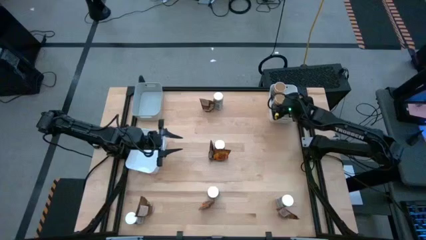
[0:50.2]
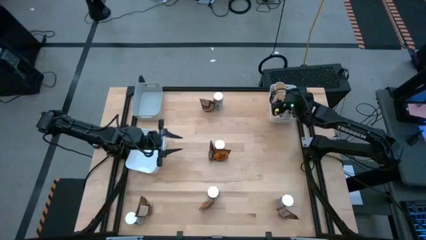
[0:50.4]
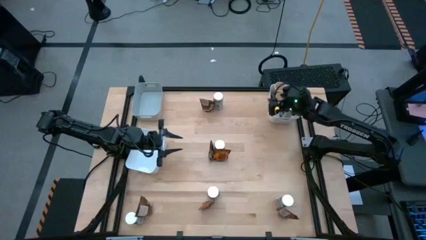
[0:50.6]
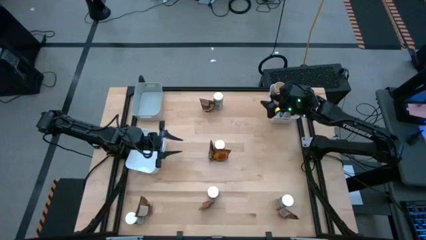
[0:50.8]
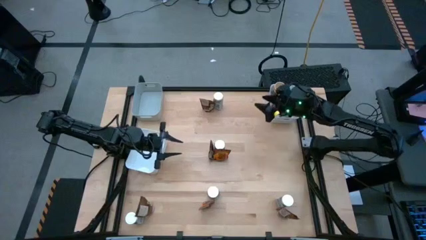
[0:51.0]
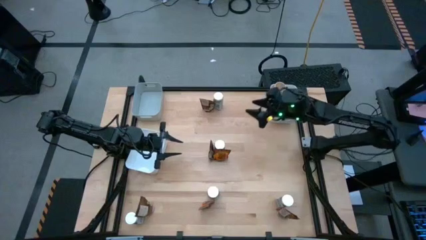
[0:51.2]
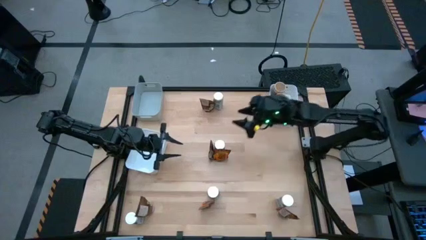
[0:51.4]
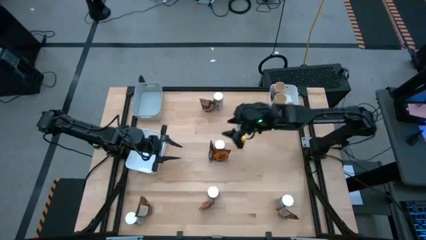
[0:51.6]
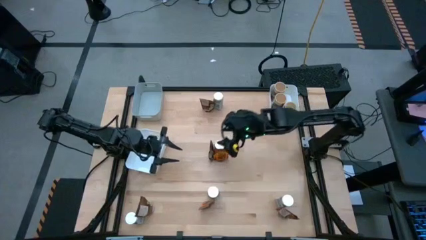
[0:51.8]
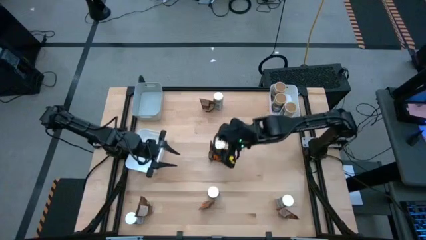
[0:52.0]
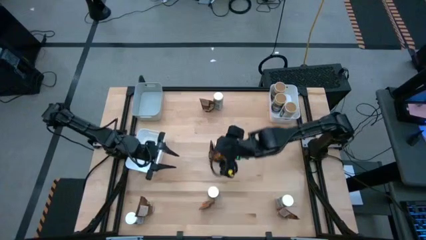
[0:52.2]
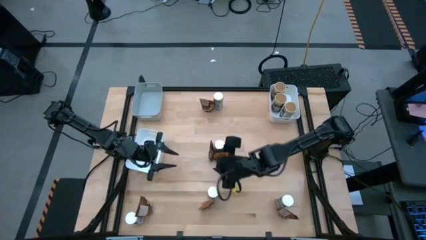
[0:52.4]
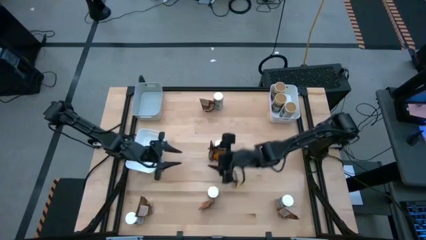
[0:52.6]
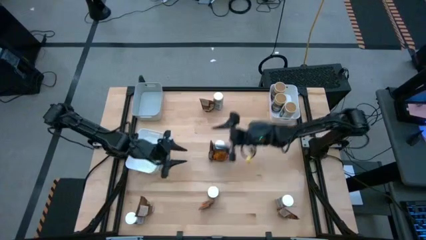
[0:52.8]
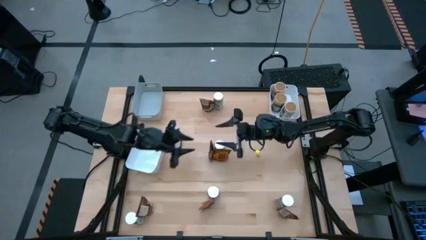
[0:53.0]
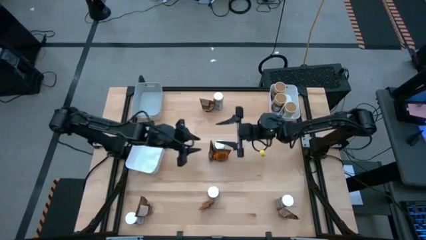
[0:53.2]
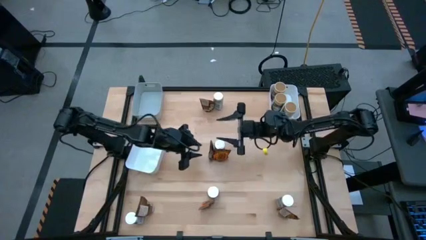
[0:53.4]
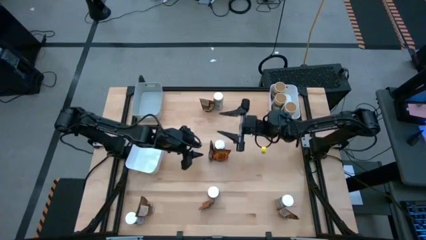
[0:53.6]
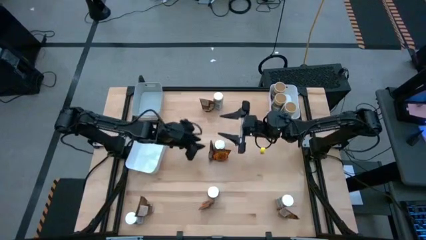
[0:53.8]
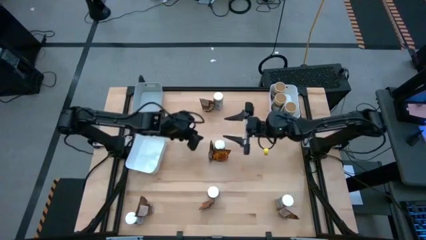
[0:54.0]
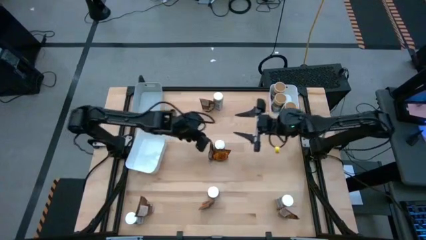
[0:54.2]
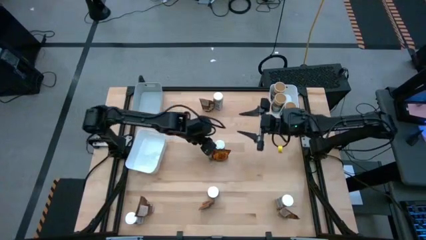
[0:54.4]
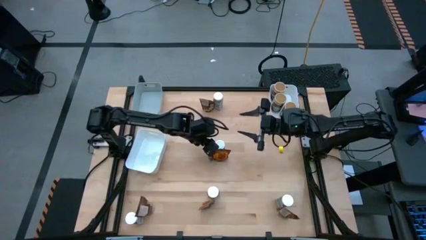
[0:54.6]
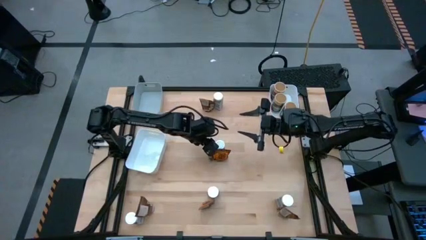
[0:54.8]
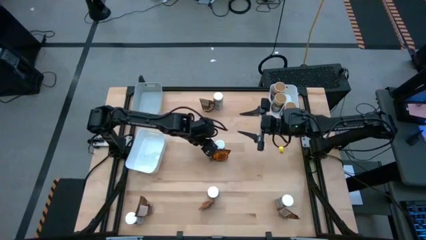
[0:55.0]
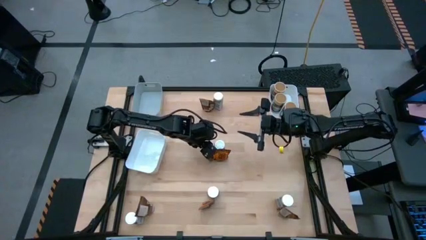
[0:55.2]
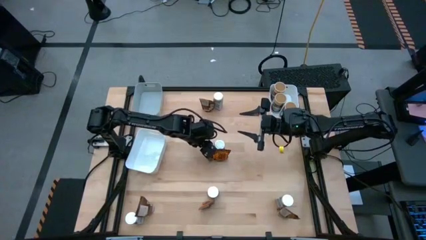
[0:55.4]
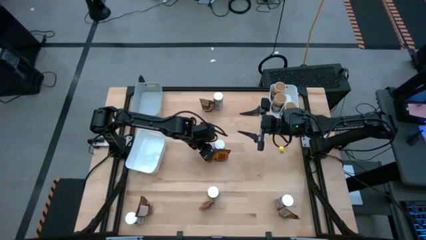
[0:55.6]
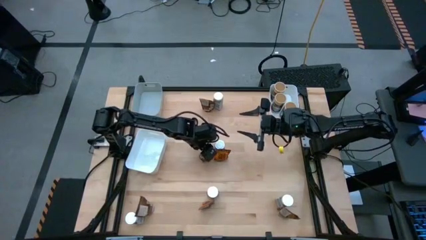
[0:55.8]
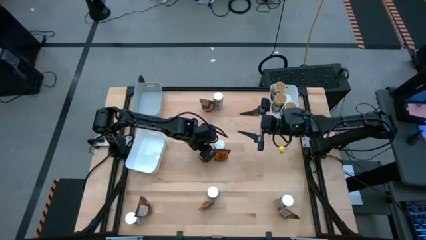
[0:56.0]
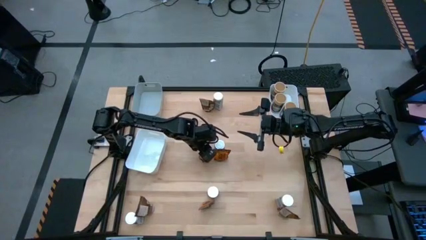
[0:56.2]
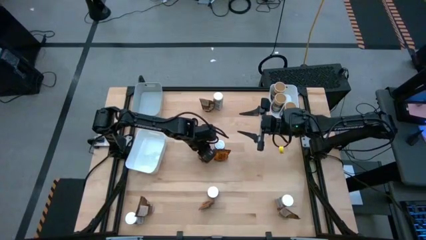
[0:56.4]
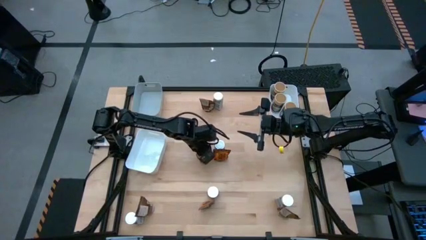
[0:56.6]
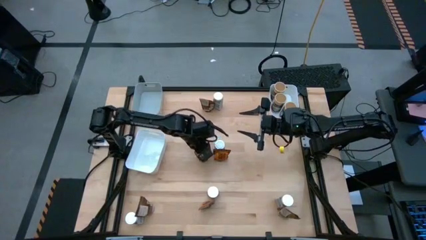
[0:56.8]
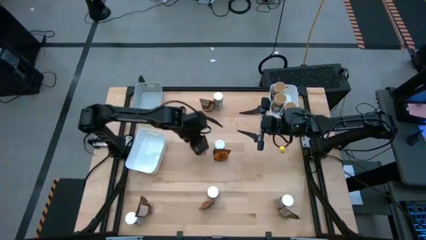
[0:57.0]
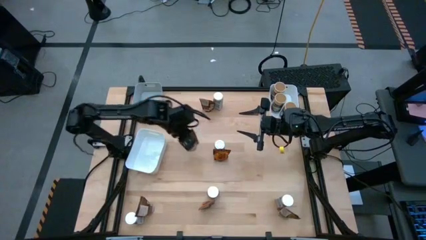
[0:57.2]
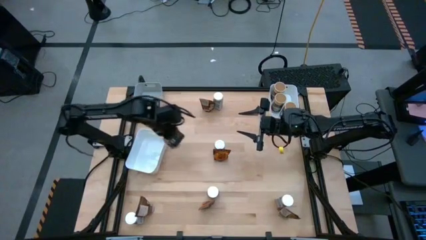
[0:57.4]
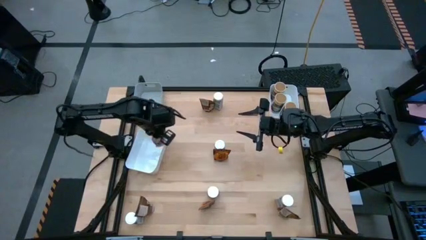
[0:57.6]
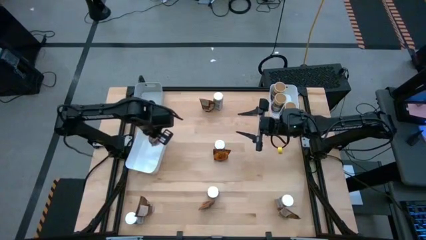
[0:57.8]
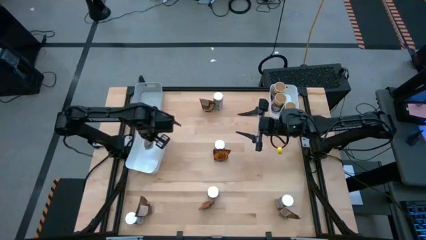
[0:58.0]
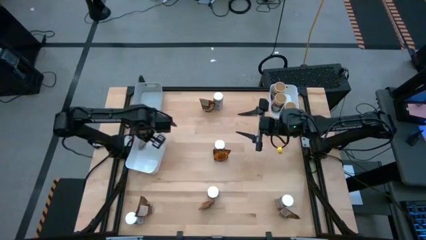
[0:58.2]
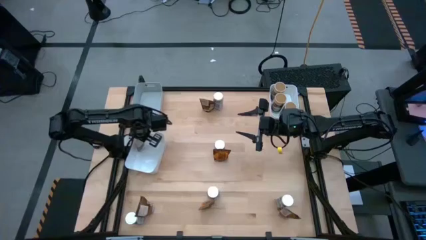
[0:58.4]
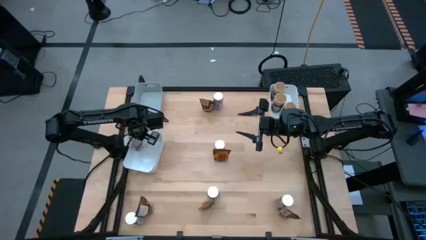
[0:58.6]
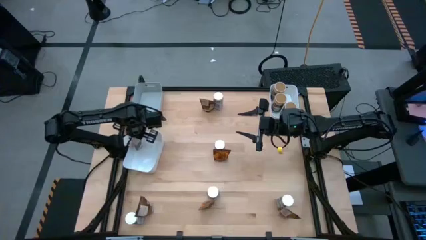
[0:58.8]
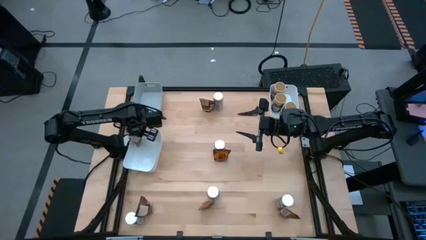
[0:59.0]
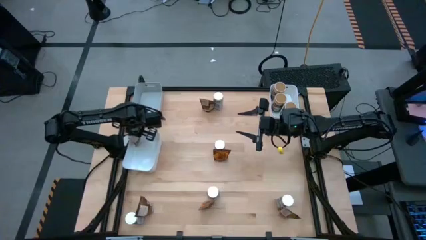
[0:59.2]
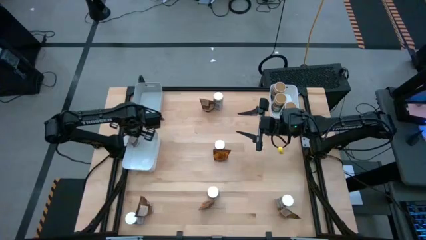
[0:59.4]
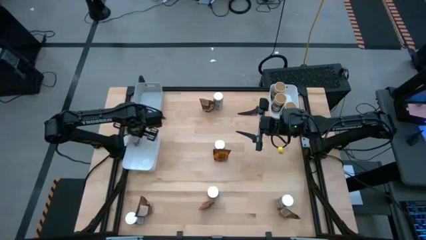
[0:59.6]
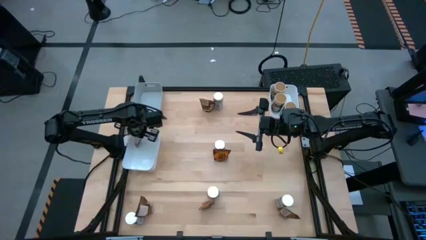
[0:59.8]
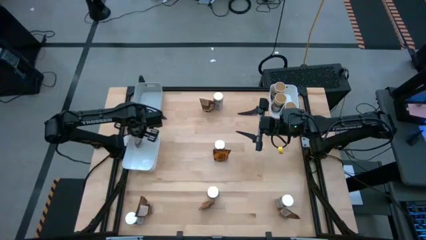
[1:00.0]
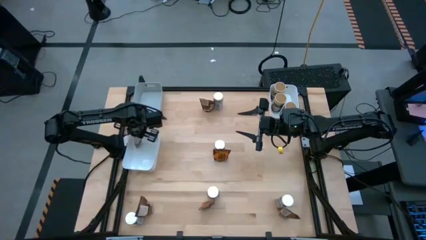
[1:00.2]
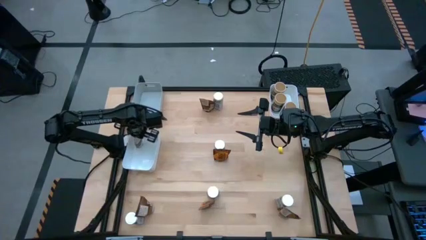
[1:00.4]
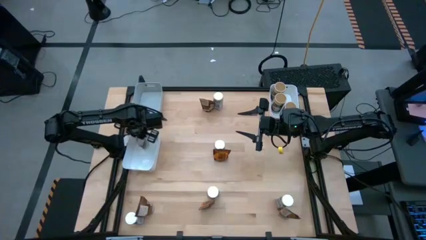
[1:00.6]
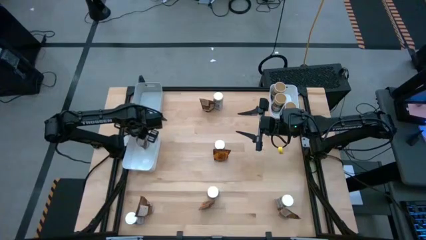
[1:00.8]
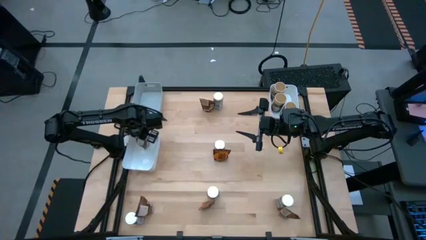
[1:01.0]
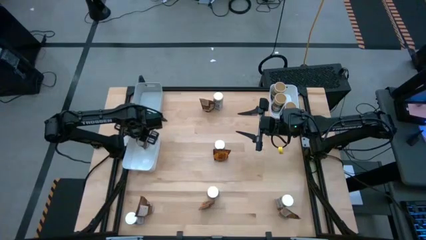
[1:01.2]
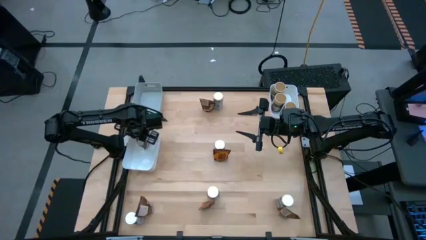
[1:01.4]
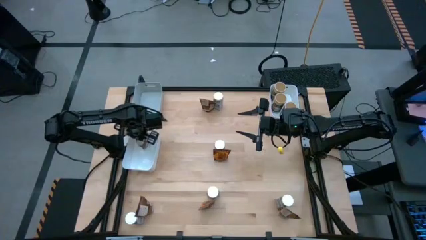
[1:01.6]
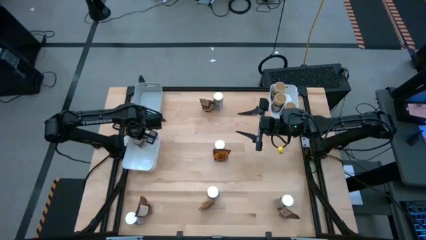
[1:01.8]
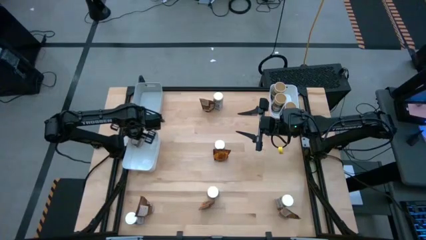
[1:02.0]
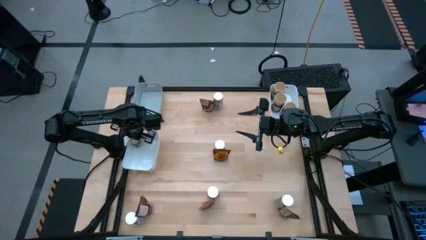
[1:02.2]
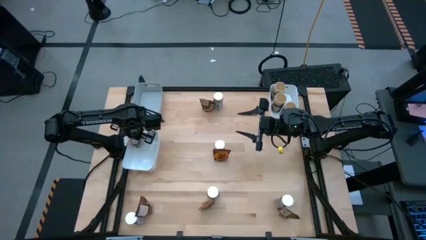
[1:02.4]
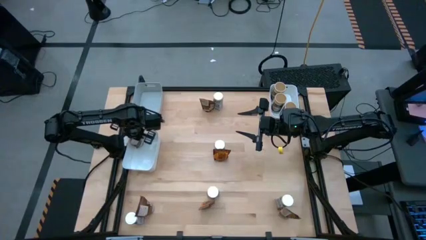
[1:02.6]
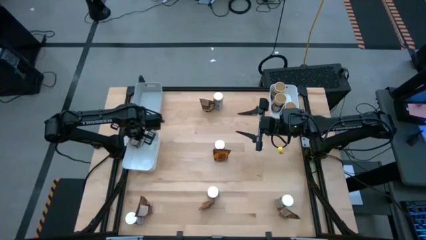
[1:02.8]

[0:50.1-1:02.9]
Task: Sort spices by type
Put the orange seasoning pack into the left white bin
